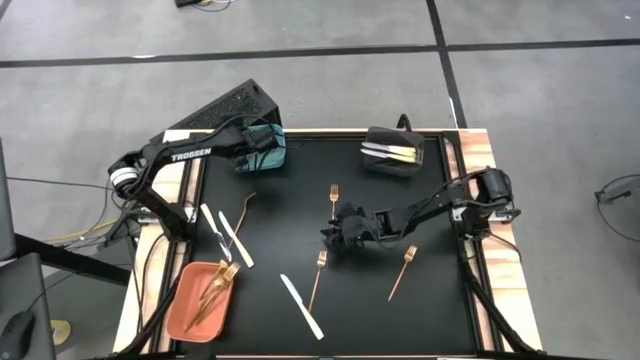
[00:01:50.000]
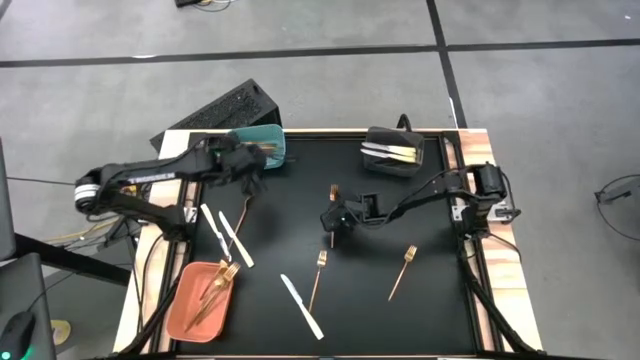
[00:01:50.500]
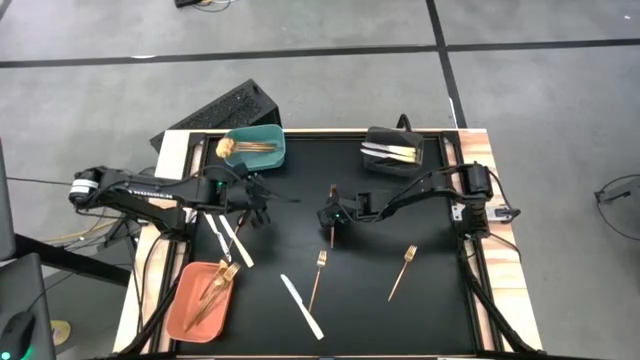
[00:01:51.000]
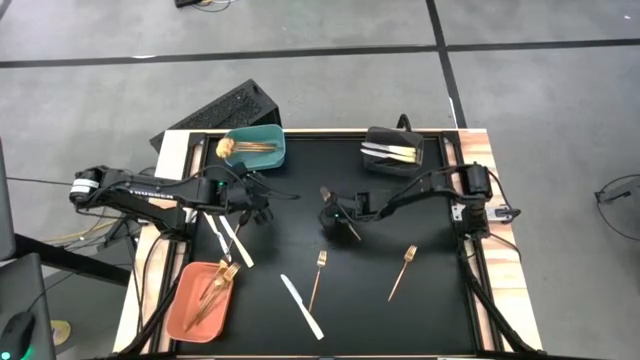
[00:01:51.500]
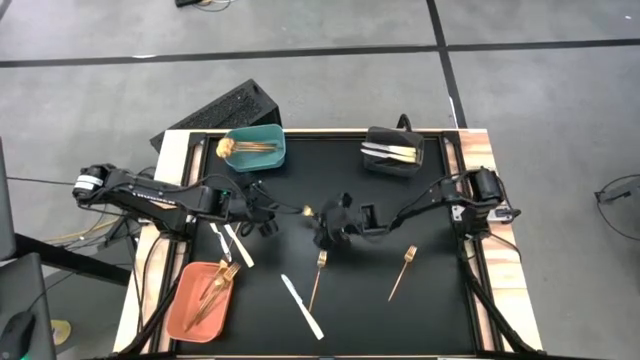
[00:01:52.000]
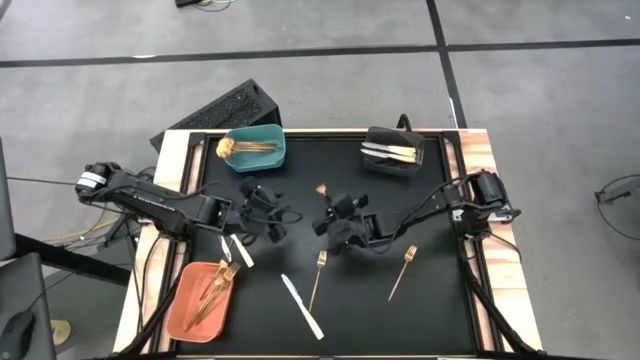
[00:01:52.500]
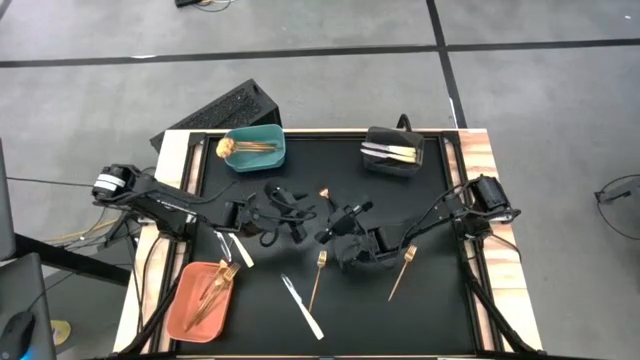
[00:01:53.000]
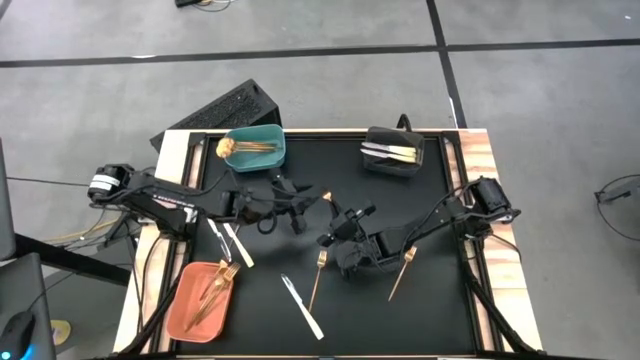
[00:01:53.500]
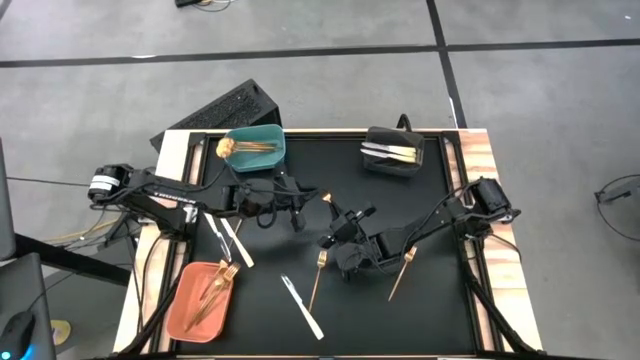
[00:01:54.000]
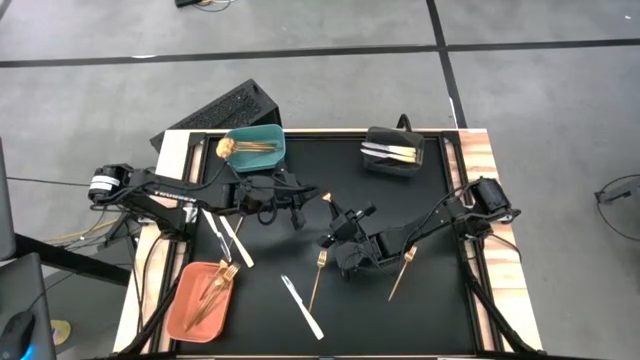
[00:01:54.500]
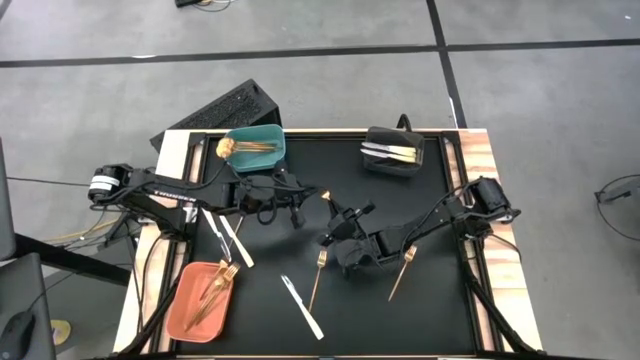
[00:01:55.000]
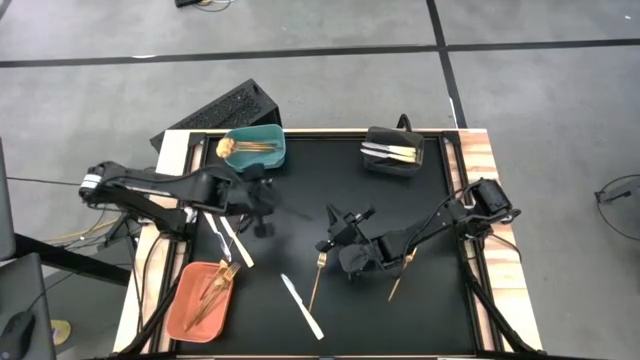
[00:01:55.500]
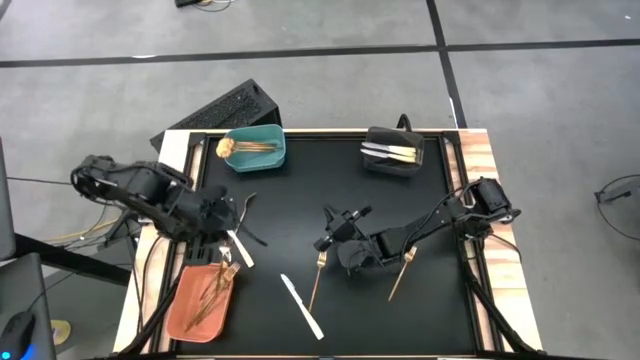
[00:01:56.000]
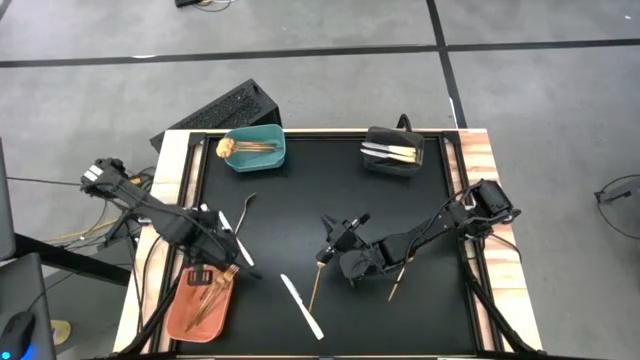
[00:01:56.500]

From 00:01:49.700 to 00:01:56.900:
Task: Sort silverware by color (type)
Put the gold fork into the orange bin

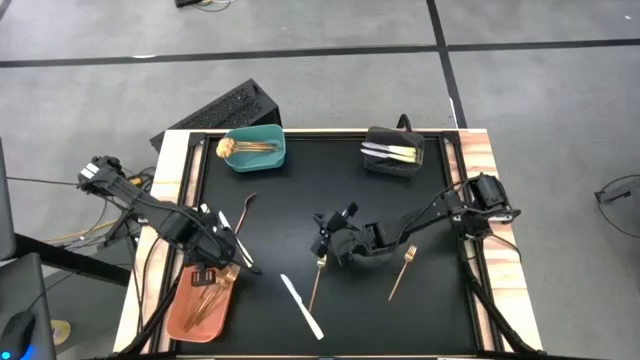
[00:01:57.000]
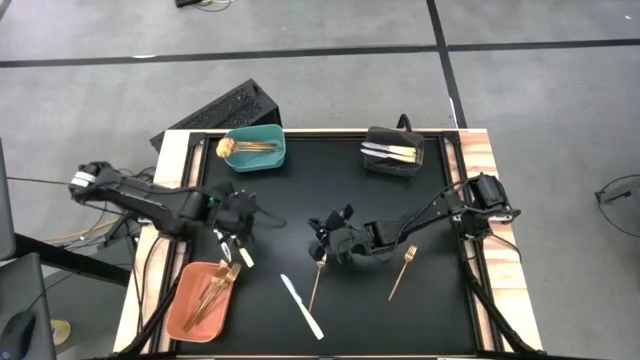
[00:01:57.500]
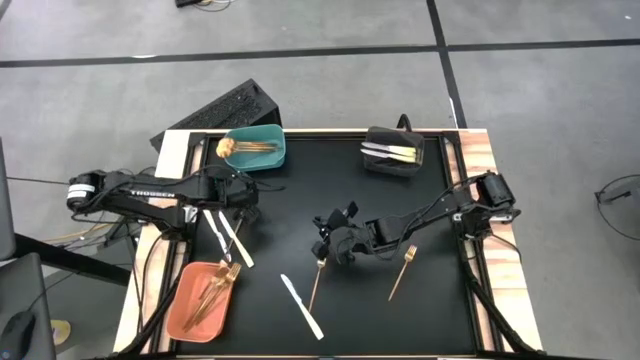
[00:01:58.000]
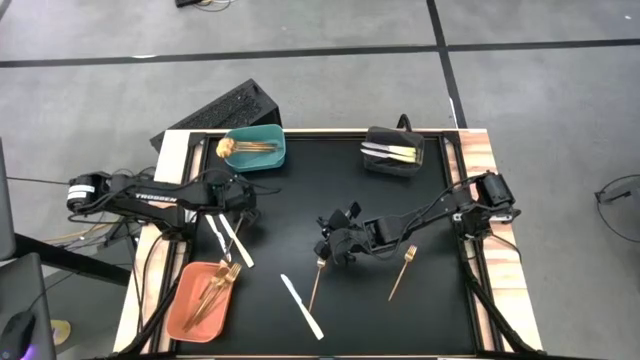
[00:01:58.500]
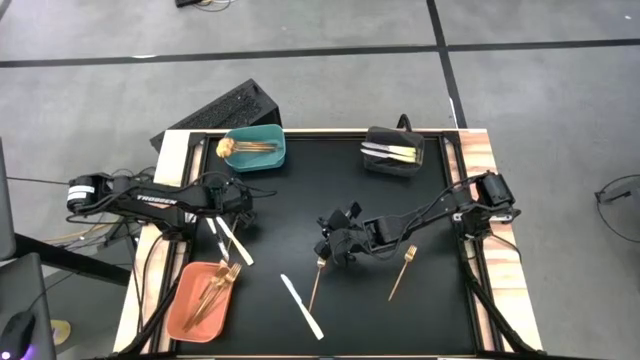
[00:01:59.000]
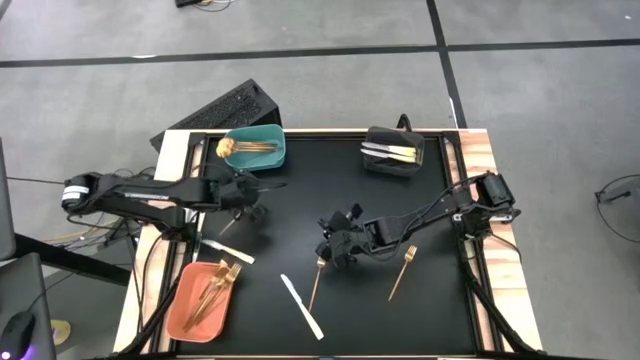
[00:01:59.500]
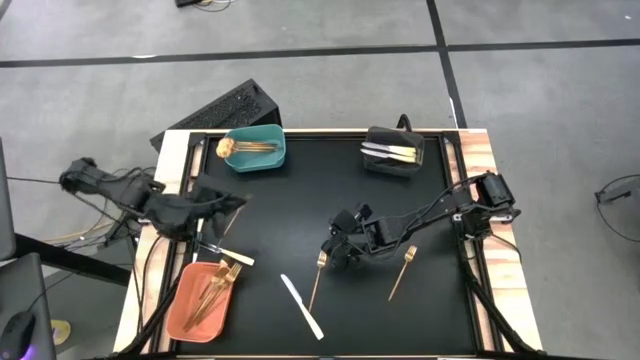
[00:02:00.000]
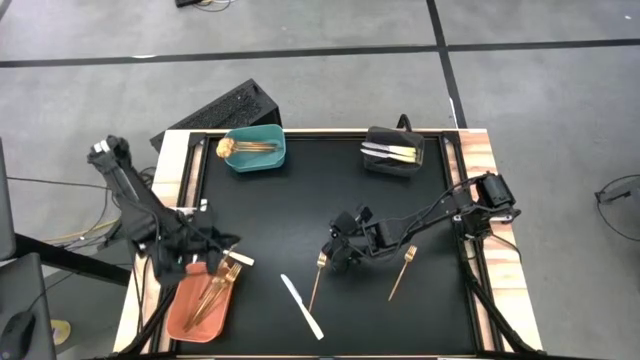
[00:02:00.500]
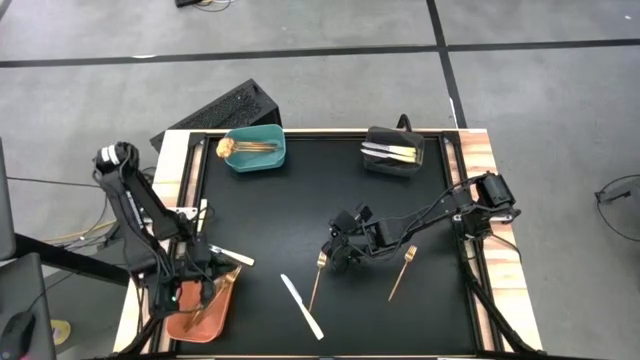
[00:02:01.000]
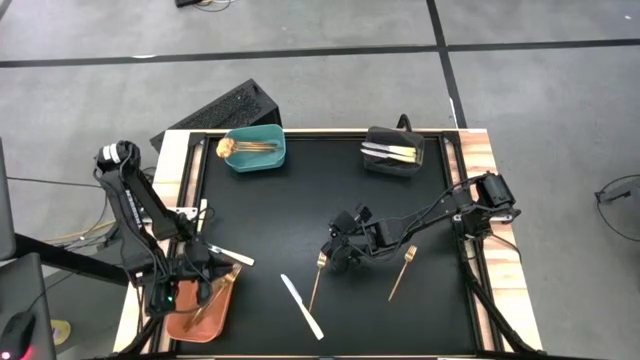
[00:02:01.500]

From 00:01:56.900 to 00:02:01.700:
Put the gold fork into the orange bin

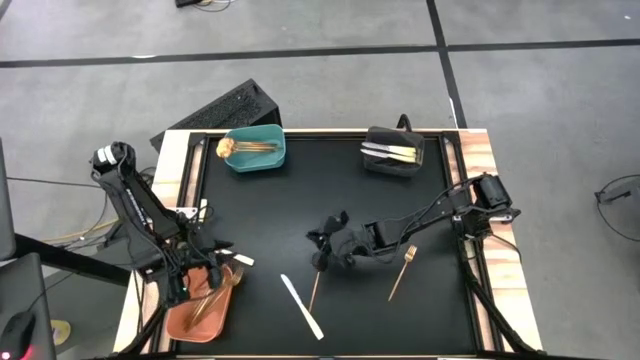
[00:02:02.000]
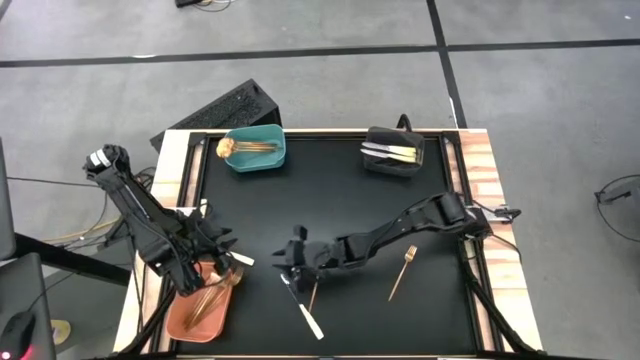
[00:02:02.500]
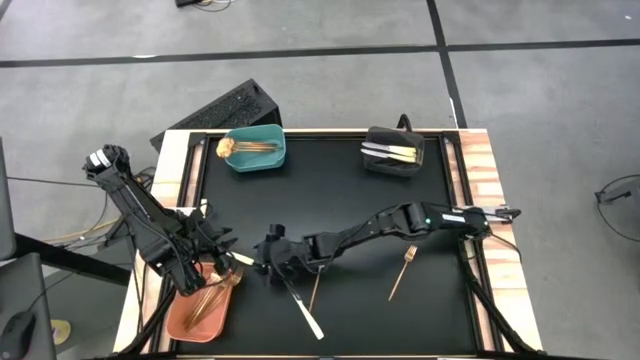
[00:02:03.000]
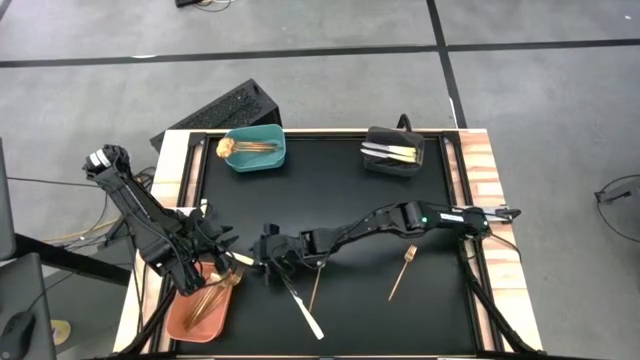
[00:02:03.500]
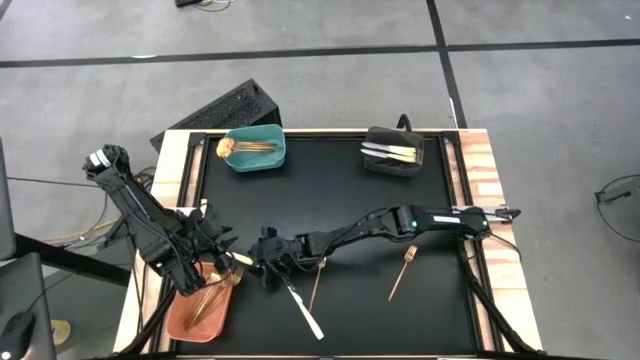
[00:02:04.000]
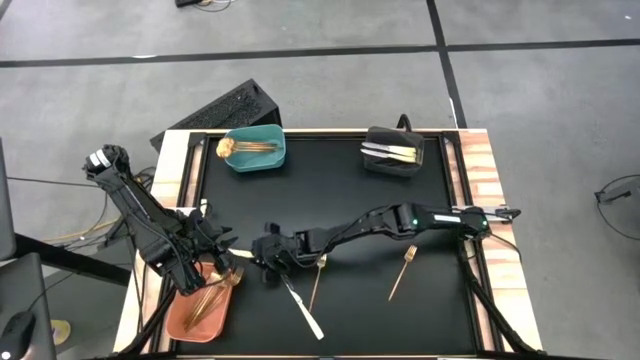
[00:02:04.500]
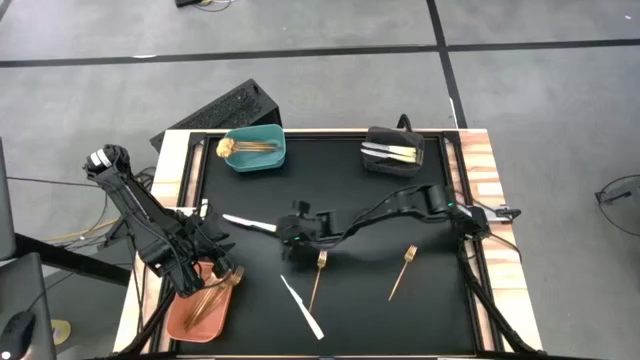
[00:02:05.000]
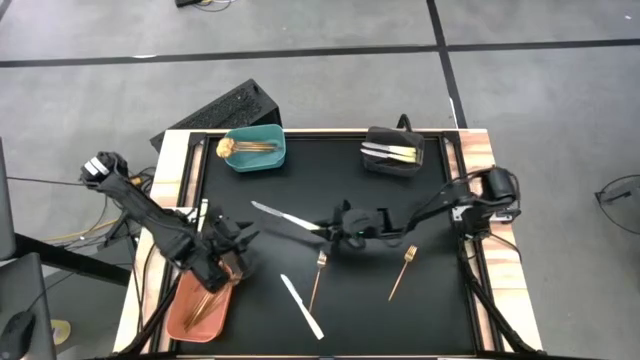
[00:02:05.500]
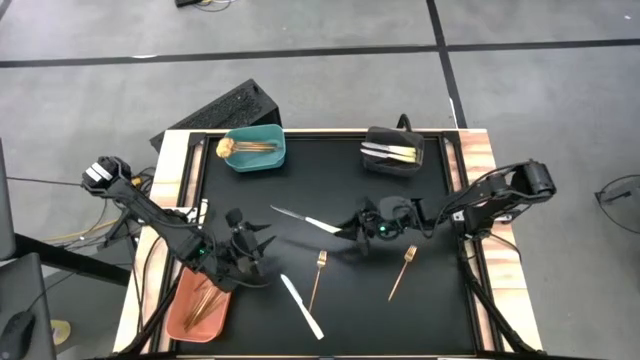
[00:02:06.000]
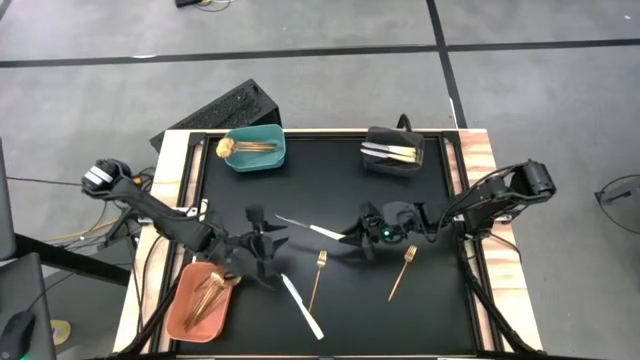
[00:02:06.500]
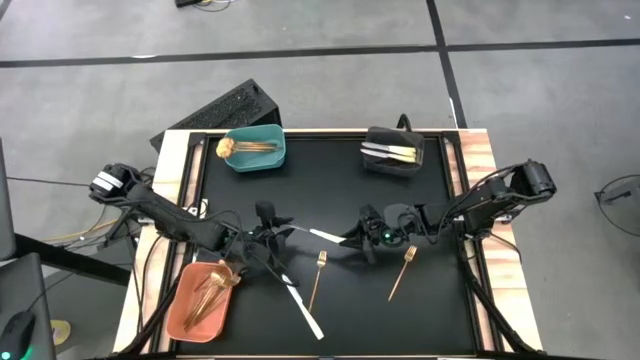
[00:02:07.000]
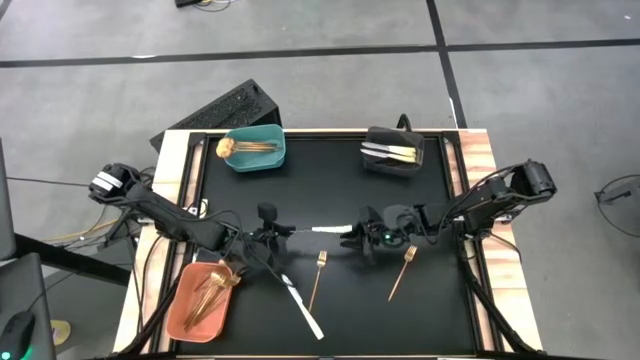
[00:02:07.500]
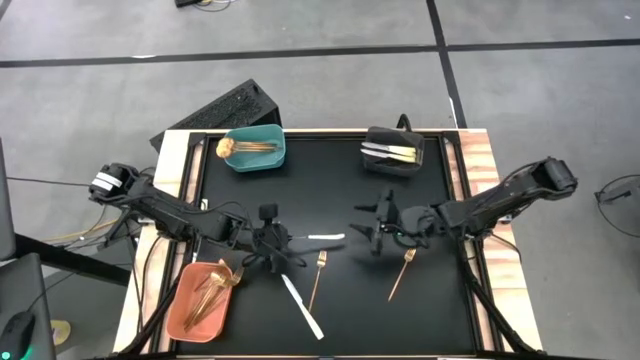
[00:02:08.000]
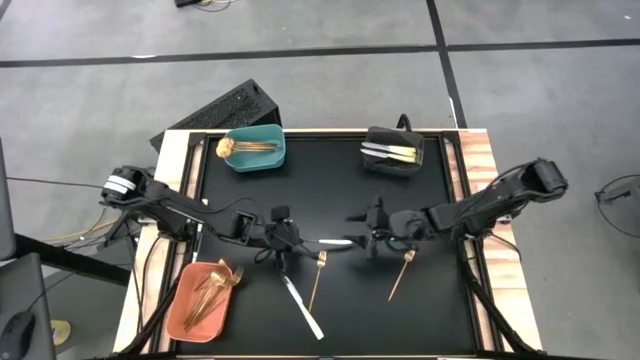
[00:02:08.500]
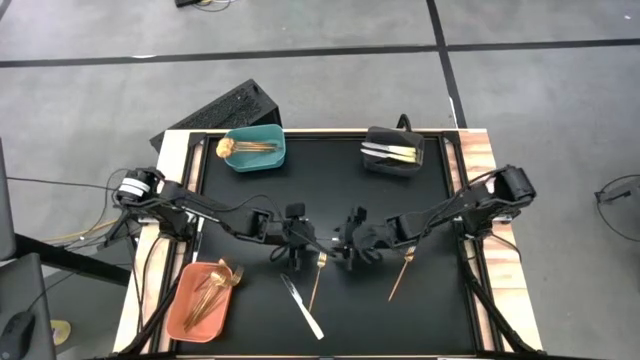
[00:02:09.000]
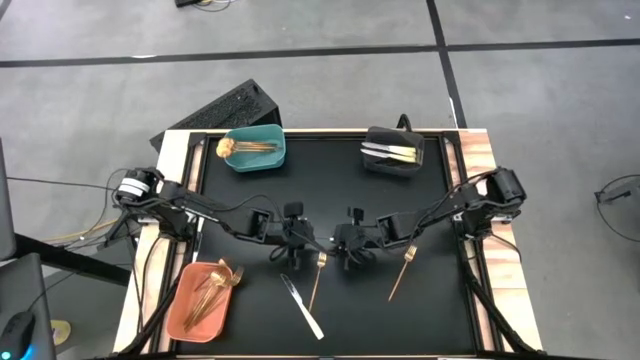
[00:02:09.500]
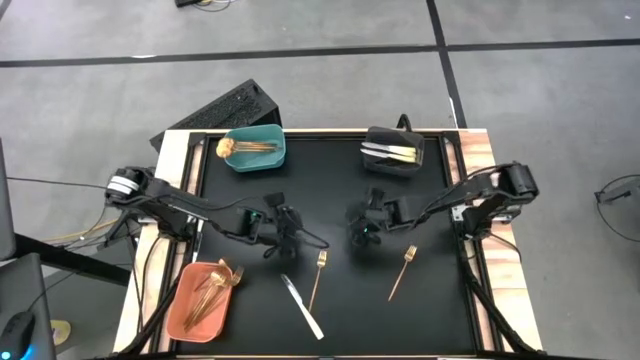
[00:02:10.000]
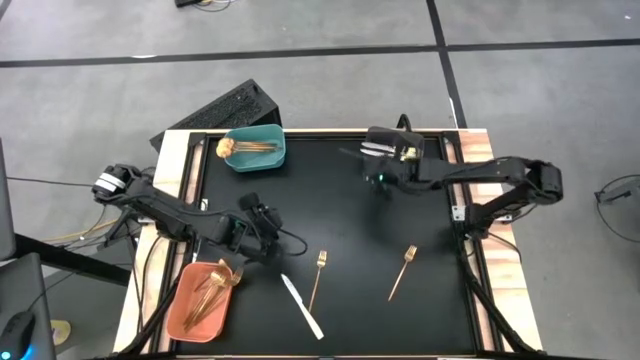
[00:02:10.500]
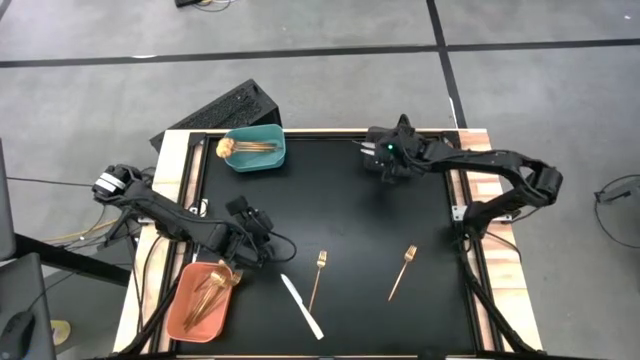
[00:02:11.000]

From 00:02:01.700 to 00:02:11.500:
Put the yellow table knife into the black bin

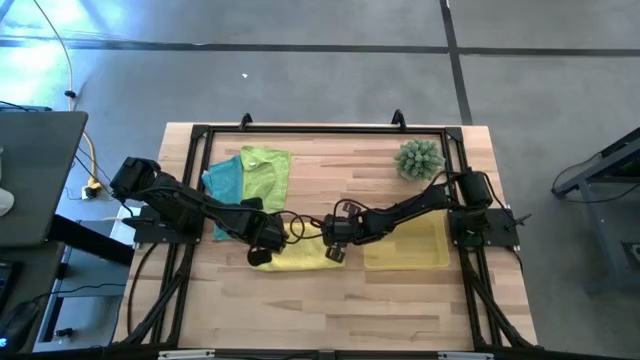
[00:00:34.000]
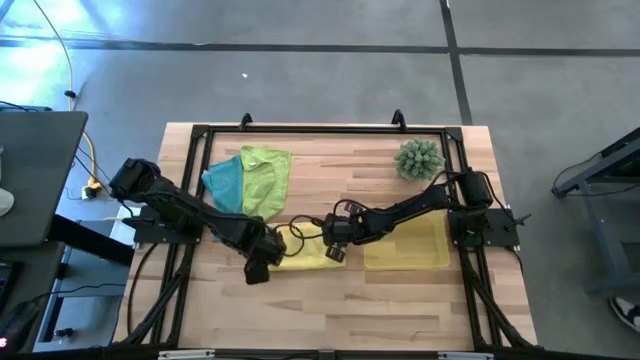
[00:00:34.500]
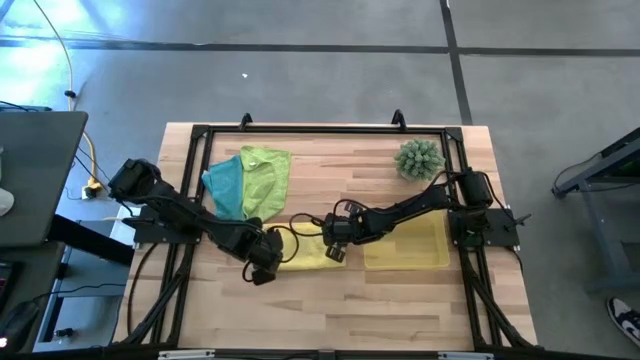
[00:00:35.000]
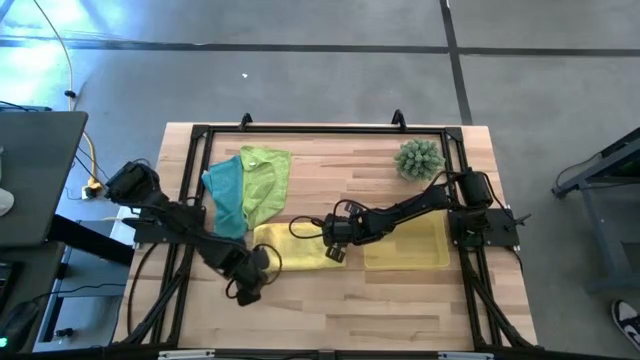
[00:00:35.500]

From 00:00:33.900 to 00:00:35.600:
Task: Roll microfiber towels into tight, uniform cylinder then place into a basket
Fold the yellow microfiber towel
